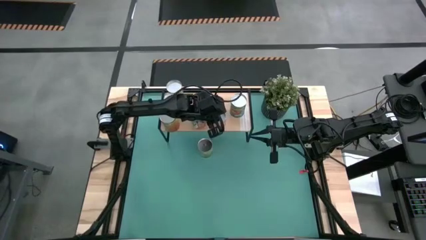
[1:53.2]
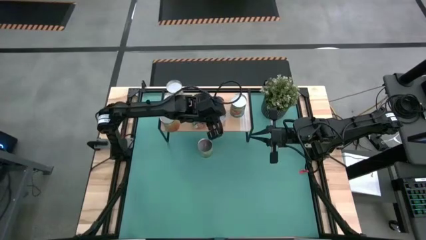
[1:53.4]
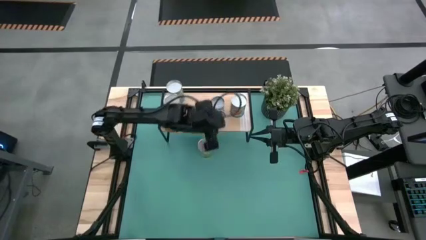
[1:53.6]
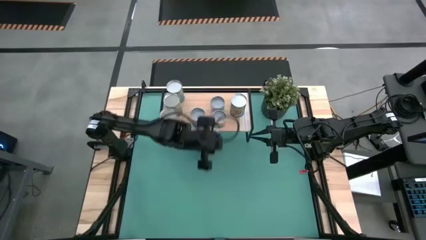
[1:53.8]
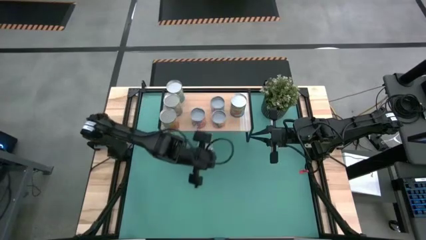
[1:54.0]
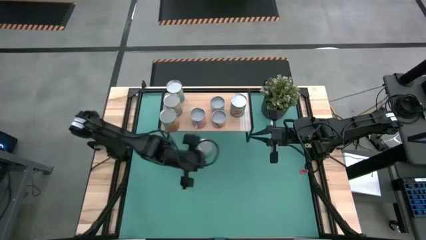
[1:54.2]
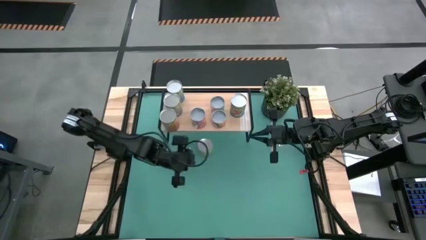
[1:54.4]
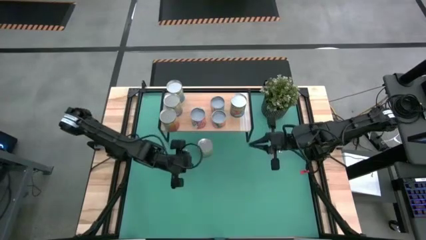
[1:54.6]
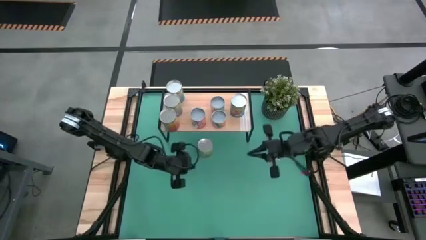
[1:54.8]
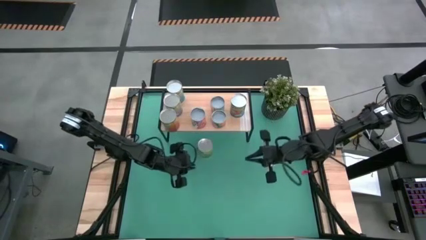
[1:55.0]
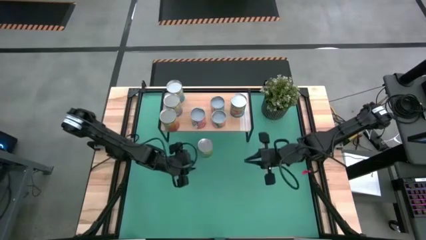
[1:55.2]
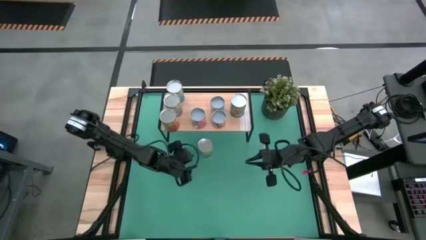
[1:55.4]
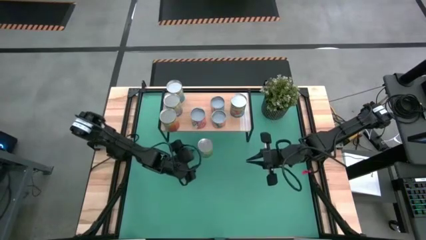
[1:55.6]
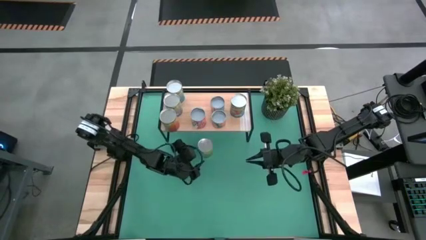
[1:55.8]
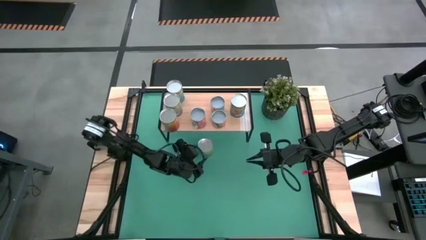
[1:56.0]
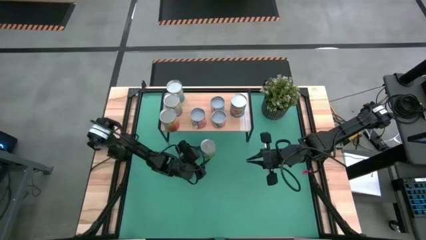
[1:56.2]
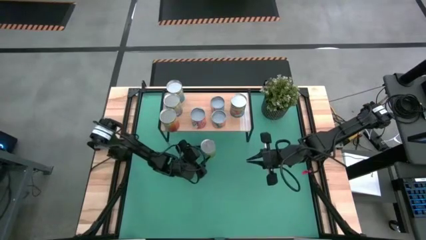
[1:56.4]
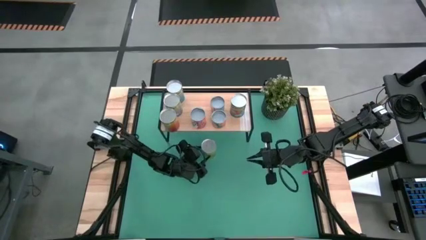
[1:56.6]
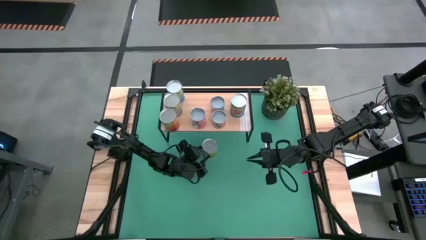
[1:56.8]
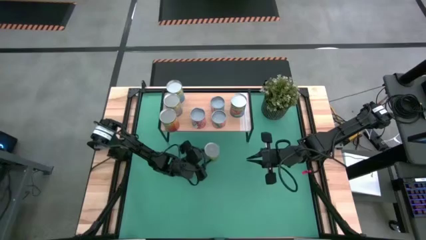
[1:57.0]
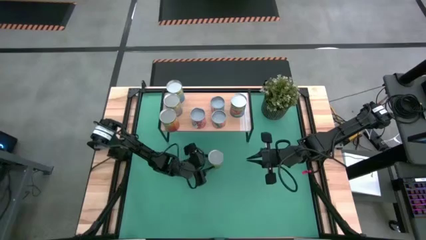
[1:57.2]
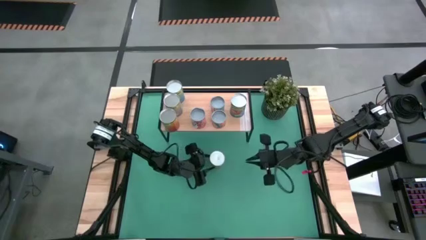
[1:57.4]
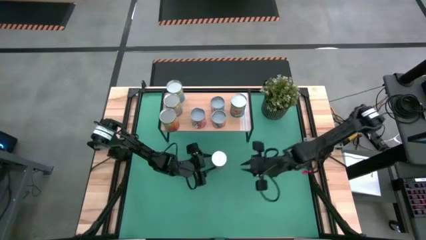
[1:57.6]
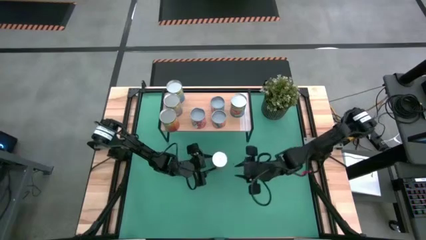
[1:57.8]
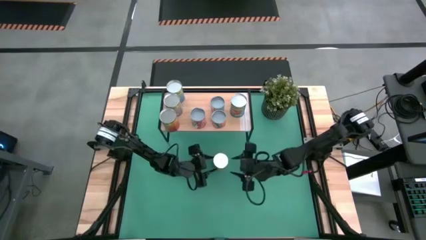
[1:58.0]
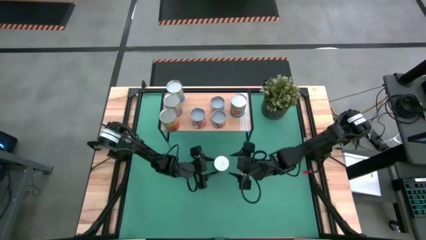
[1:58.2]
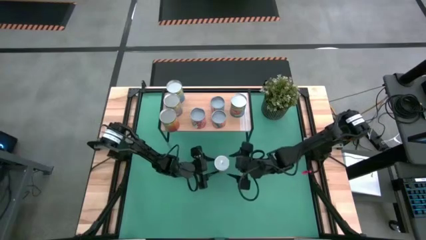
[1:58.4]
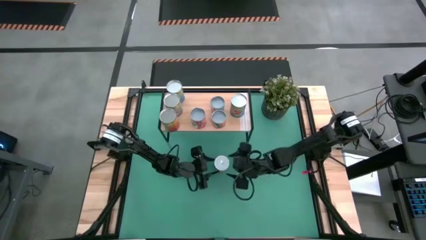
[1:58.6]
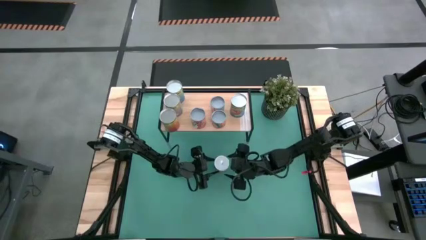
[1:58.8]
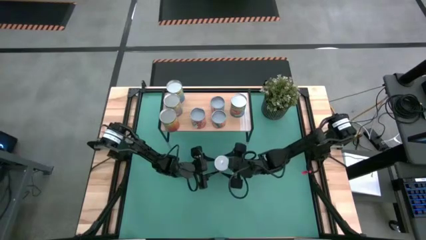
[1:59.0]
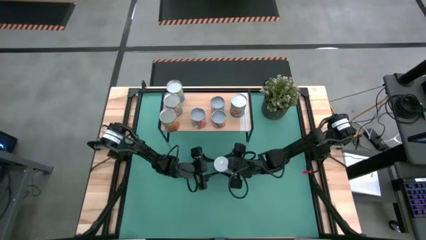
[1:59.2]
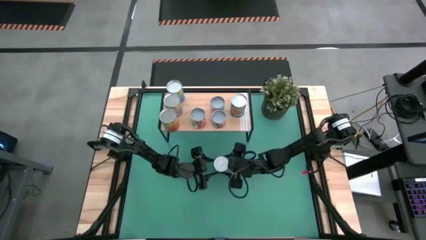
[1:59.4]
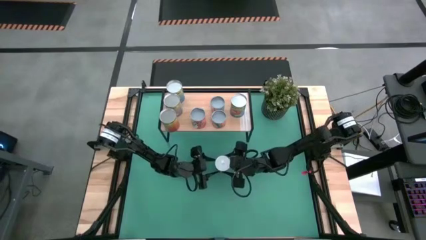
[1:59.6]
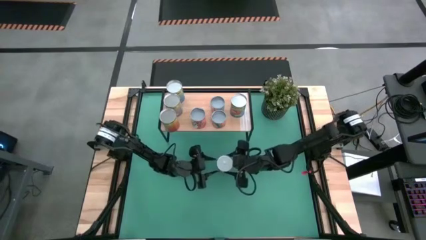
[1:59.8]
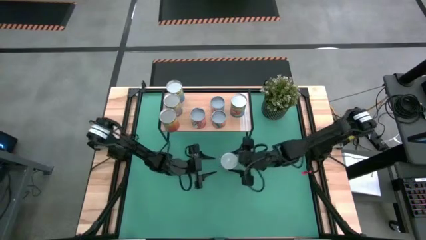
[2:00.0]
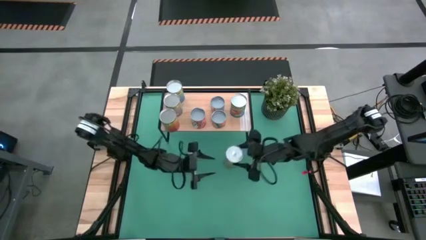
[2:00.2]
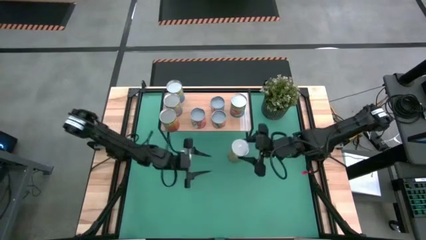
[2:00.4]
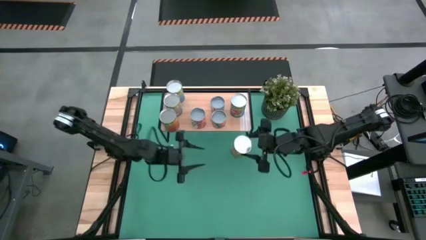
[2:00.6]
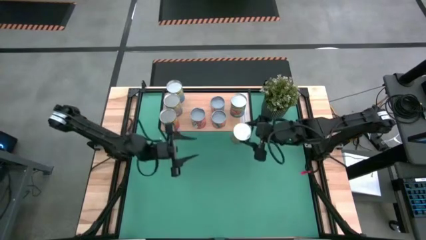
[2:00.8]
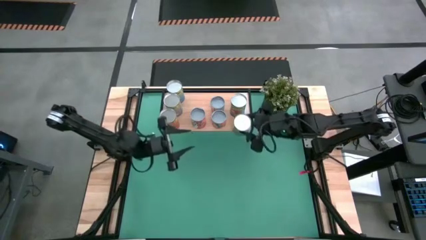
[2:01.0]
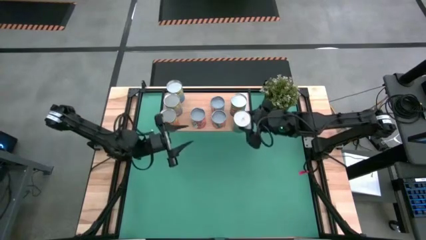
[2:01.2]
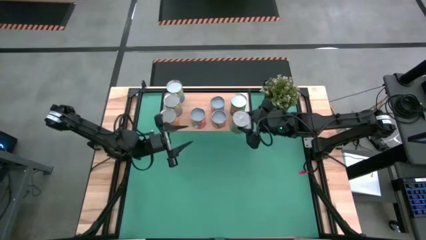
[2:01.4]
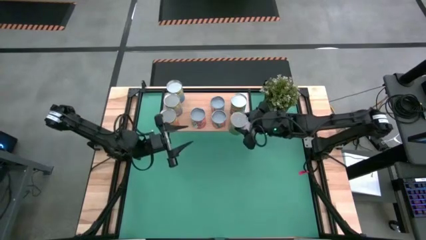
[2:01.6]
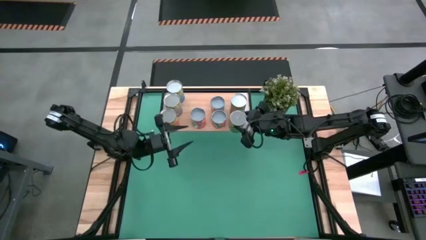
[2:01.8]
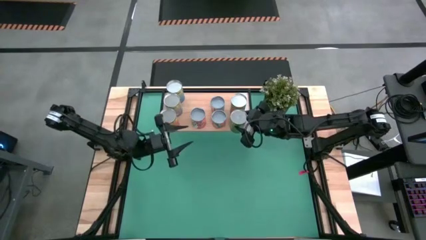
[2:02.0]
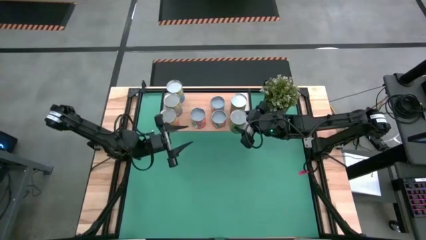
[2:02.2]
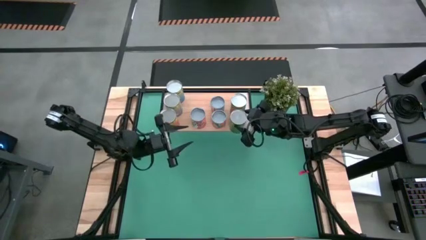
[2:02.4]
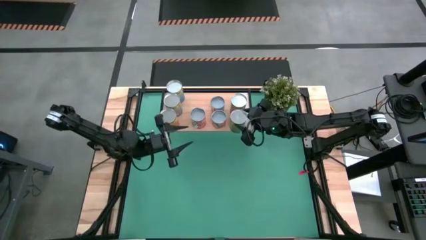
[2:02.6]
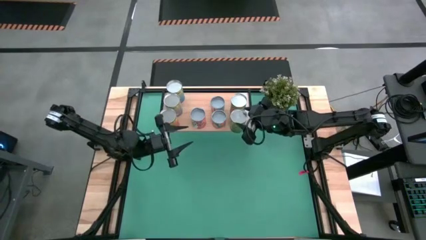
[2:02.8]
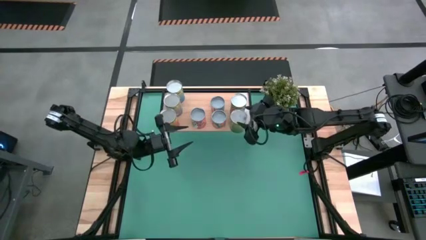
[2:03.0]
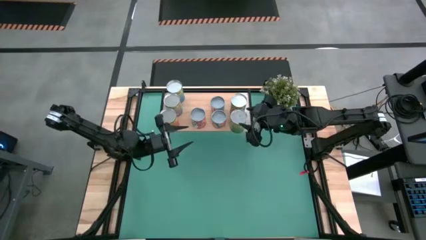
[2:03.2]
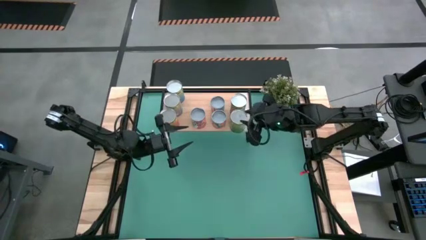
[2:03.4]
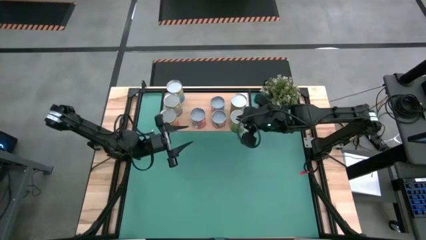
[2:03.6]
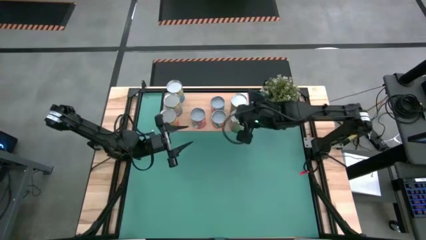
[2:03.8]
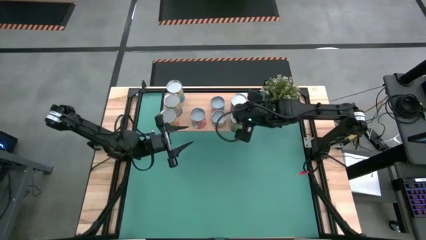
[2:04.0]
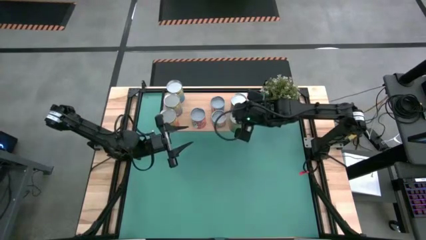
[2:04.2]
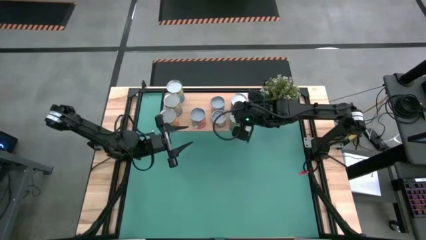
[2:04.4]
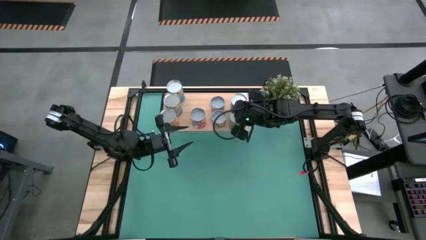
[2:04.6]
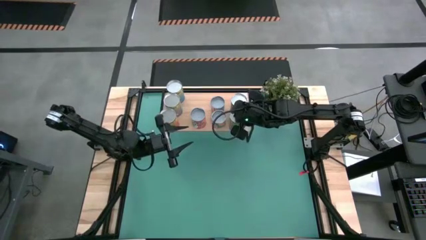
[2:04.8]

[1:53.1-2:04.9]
Task: Pick and place cans onto a shelf
Put the large canned oranges on the shelf

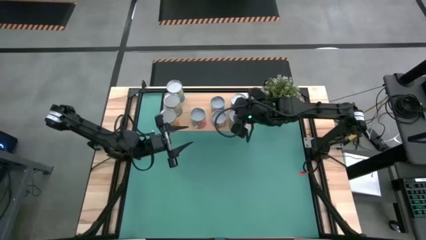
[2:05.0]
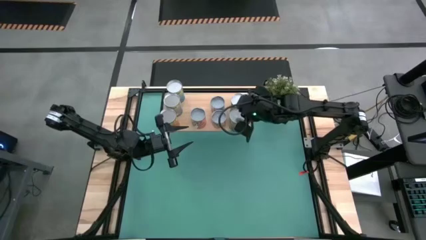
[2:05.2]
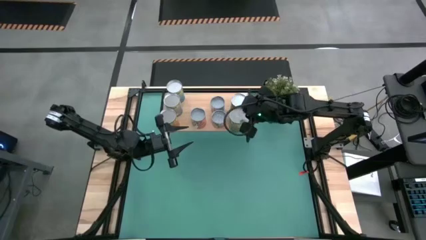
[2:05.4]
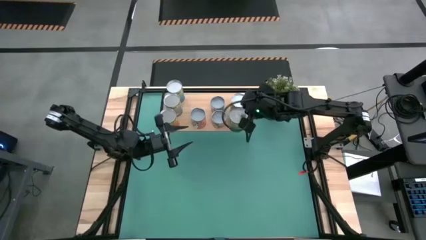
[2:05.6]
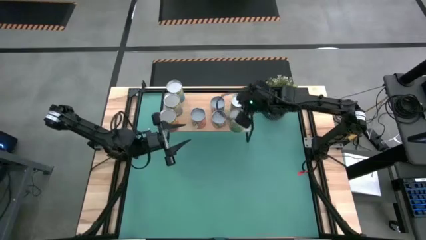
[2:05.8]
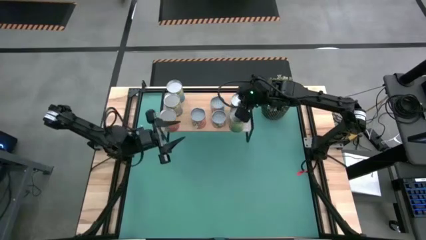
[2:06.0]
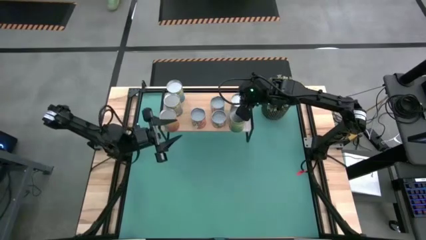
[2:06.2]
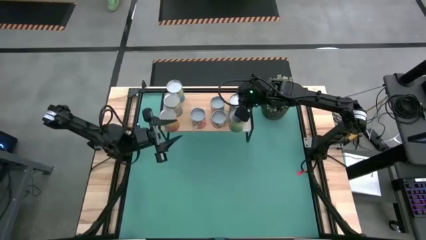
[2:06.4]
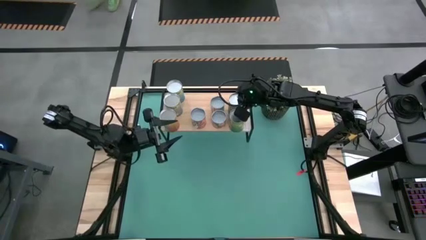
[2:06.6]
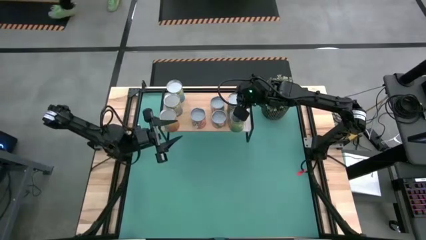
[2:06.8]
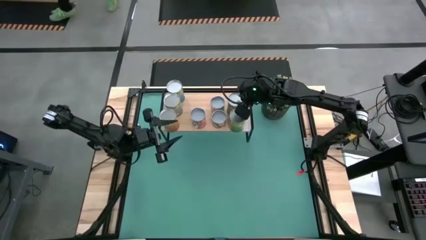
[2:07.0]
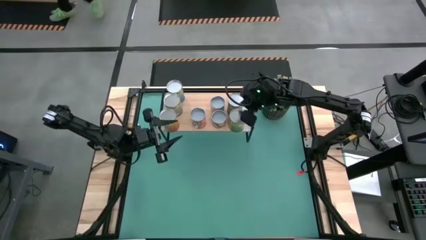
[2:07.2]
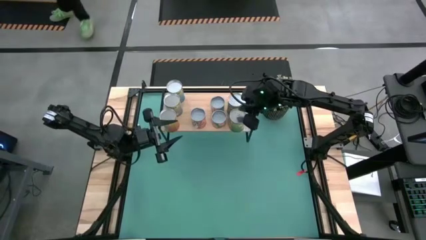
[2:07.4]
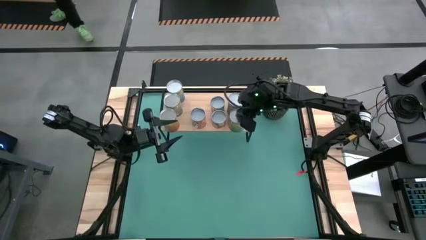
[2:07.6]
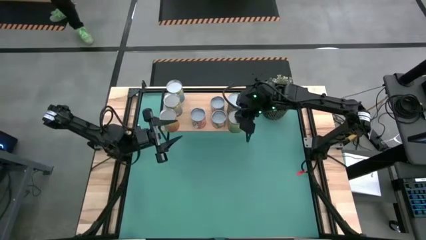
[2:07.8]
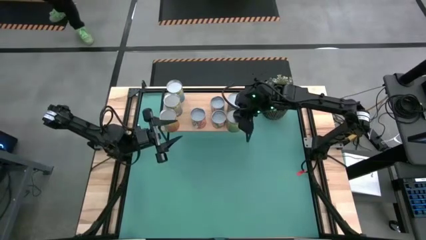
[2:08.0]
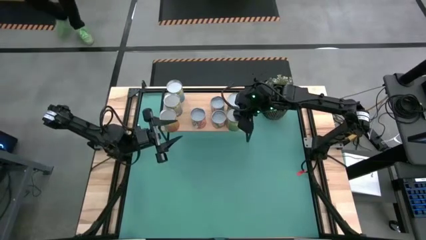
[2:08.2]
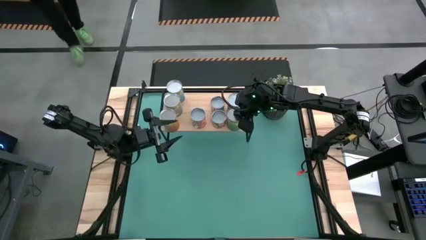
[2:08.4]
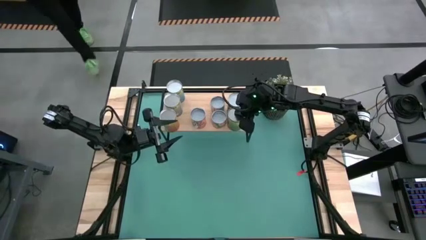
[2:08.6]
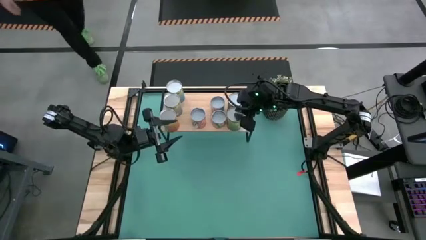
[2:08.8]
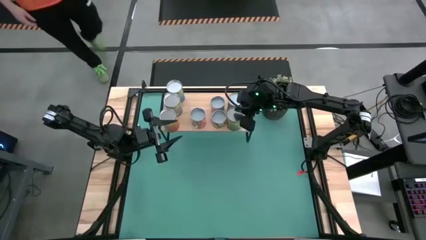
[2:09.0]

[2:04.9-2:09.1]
Adjust the canned goods on the shelf
